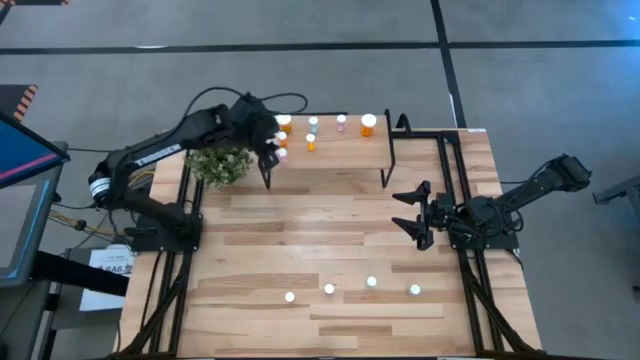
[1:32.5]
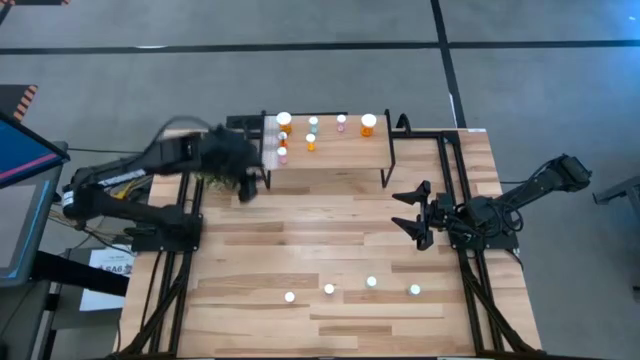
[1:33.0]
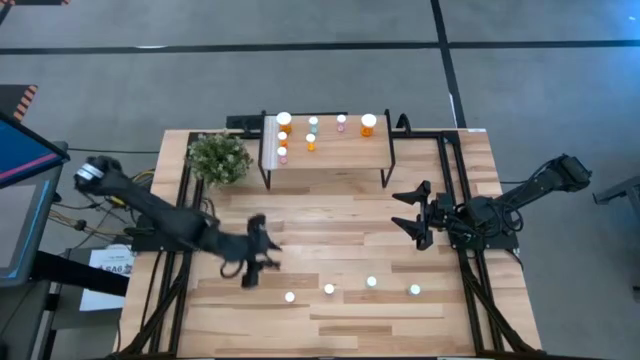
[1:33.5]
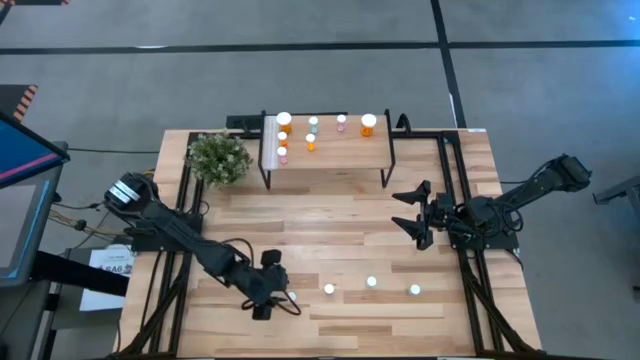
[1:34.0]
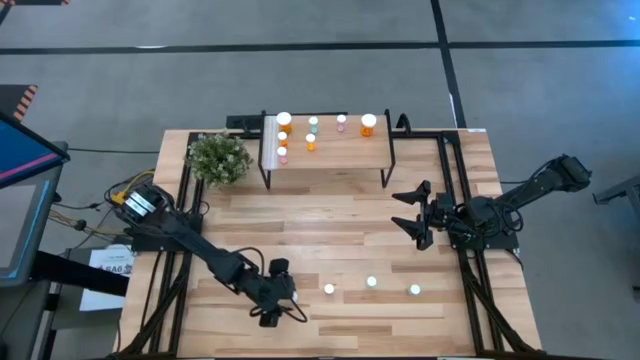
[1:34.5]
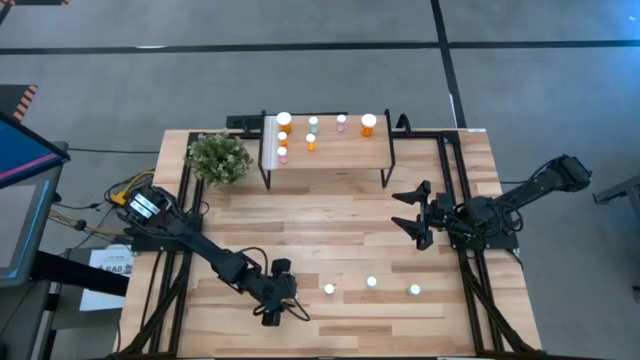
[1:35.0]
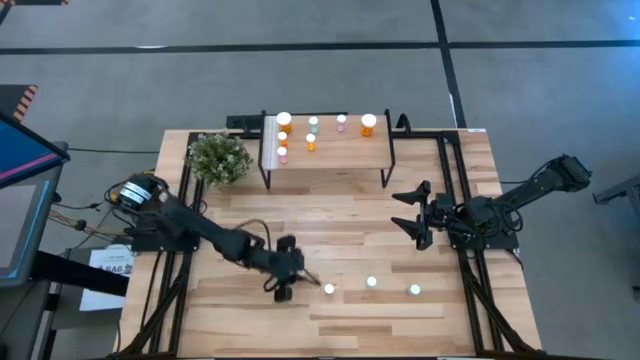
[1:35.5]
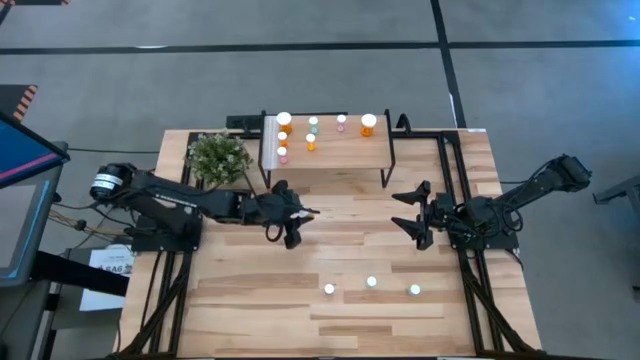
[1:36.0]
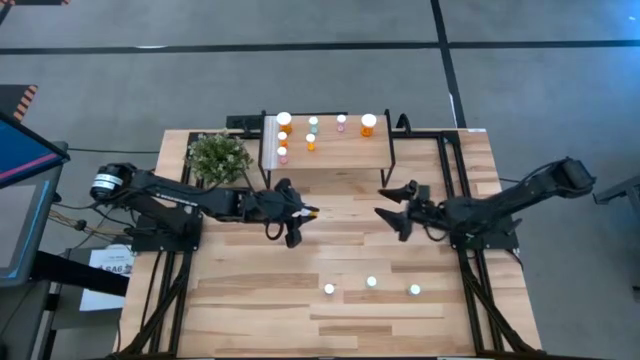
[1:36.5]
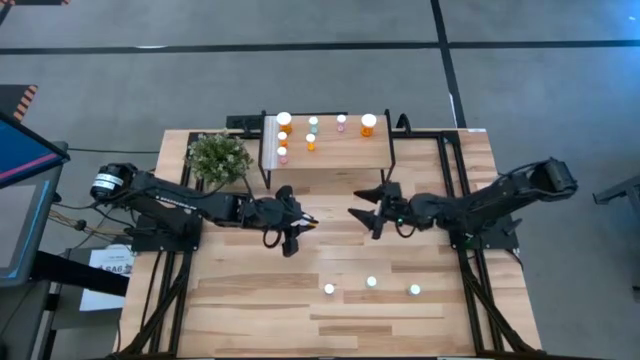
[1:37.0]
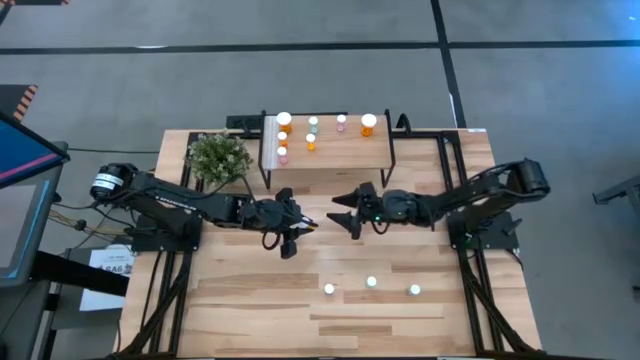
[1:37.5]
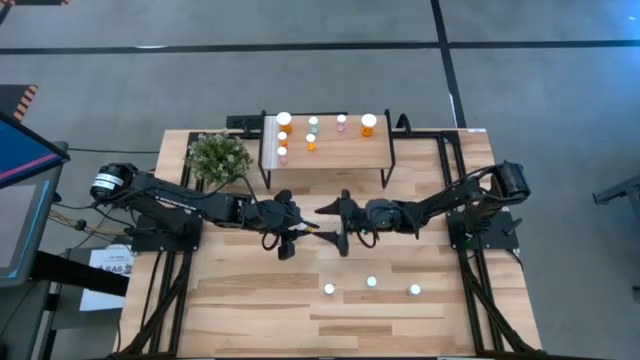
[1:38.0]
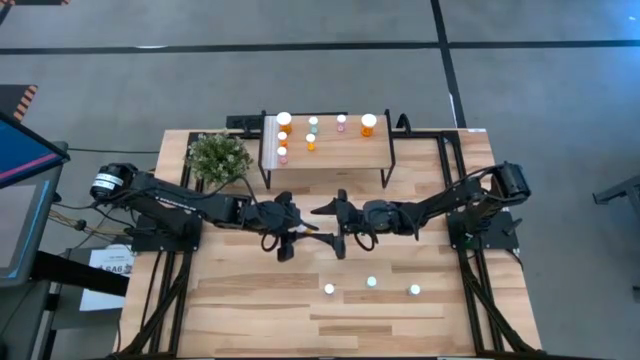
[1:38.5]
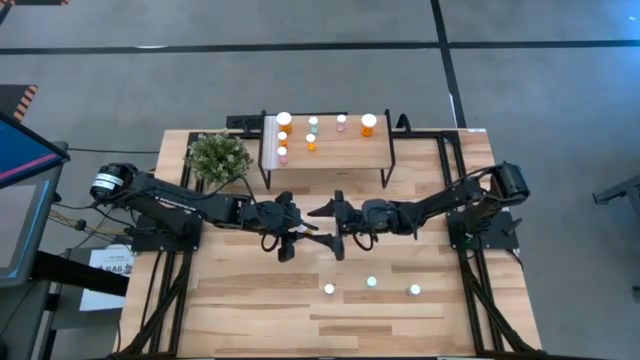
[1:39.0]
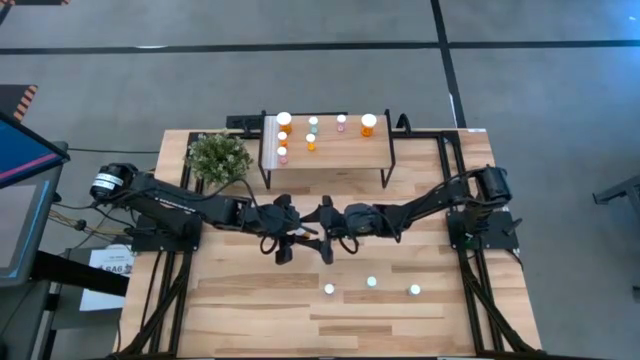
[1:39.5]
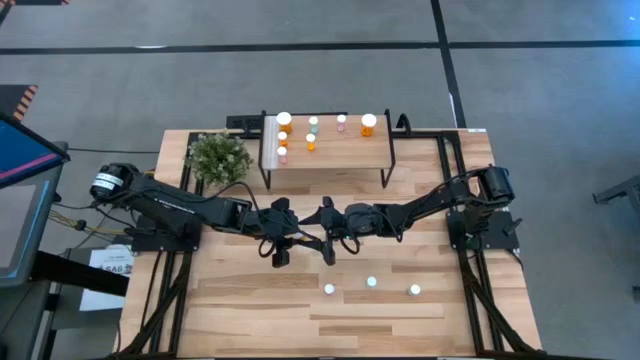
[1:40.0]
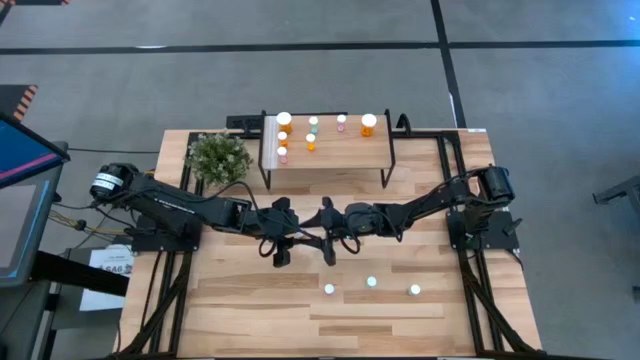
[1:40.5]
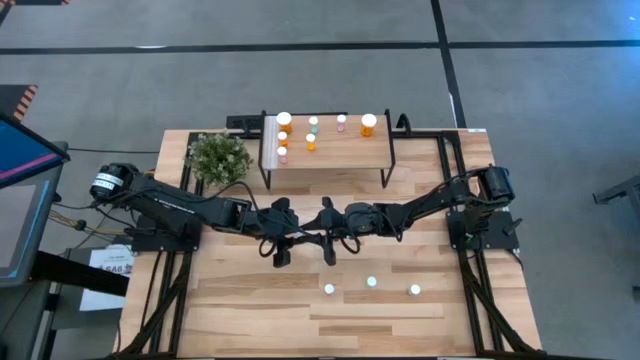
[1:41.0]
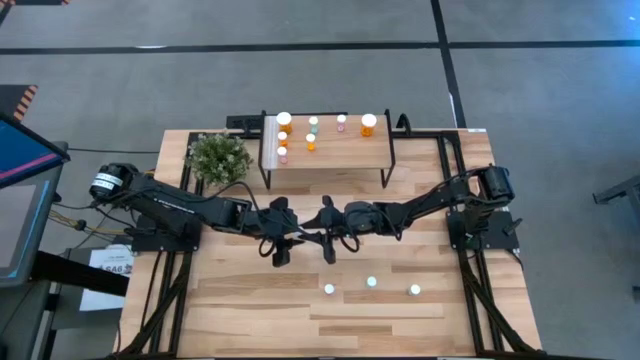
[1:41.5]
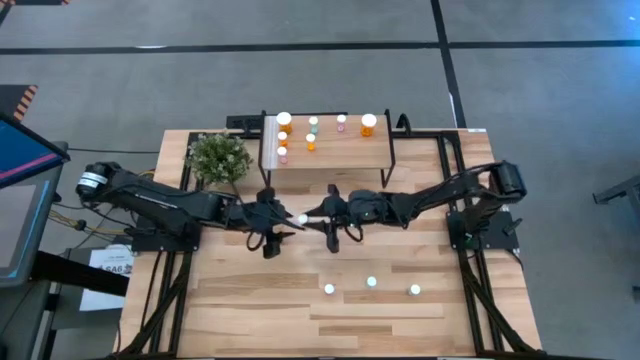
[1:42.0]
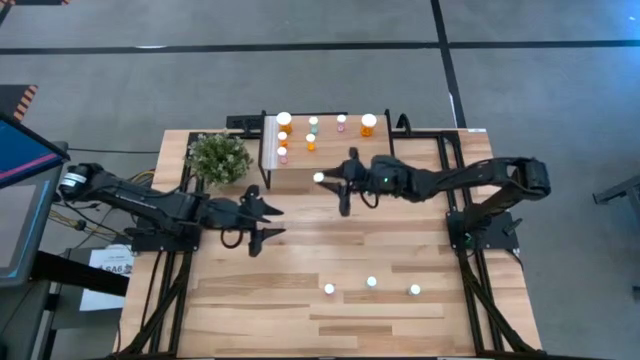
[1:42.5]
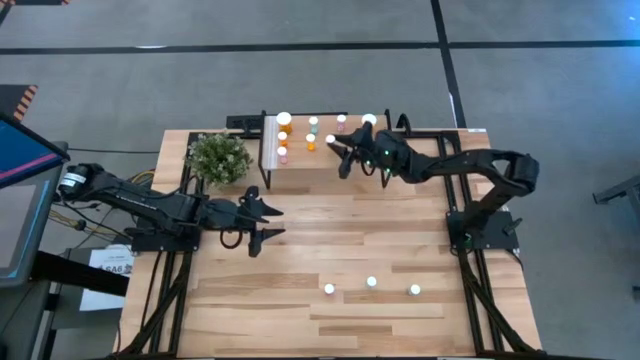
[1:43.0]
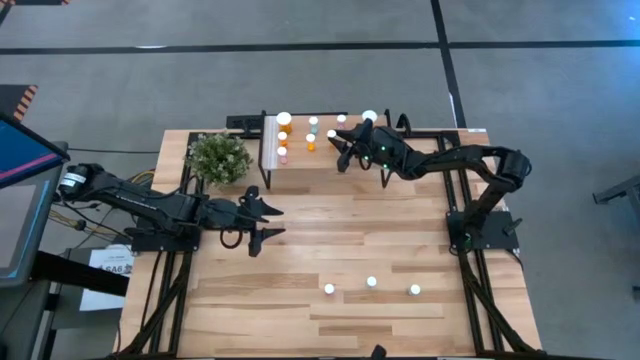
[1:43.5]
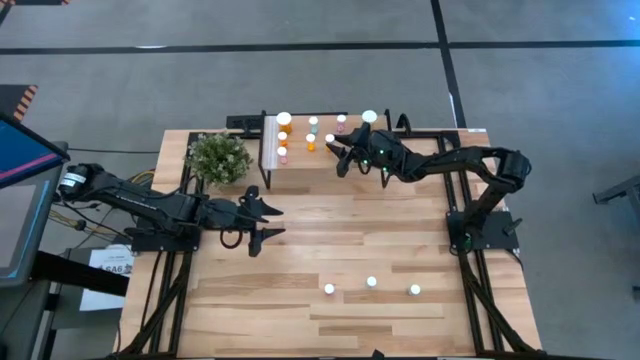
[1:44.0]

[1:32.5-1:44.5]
Task: Pick and place medicine bottles onto shelf by color
Put the small orange pill bottle on the shelf

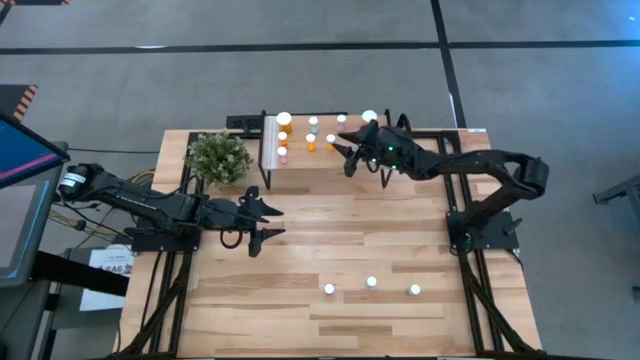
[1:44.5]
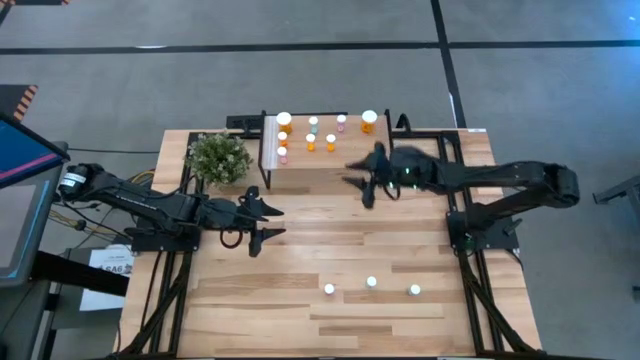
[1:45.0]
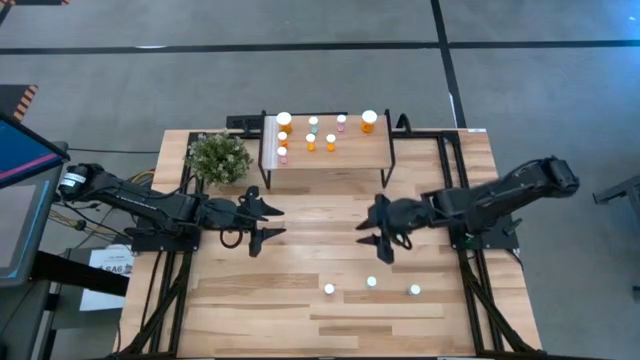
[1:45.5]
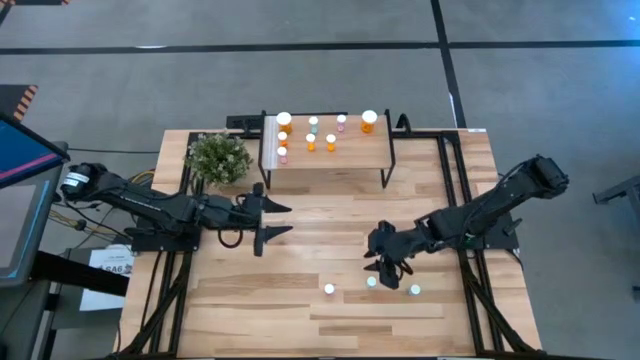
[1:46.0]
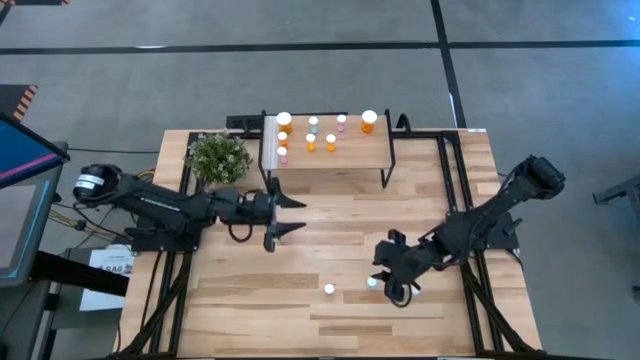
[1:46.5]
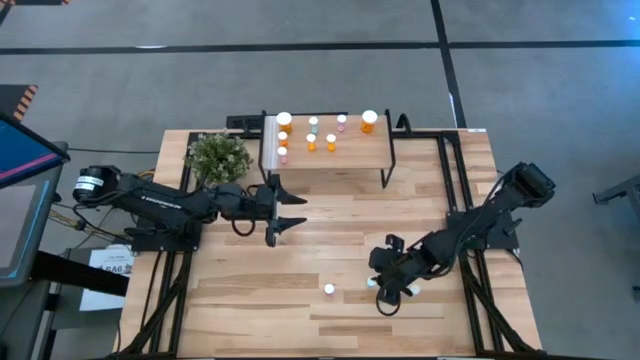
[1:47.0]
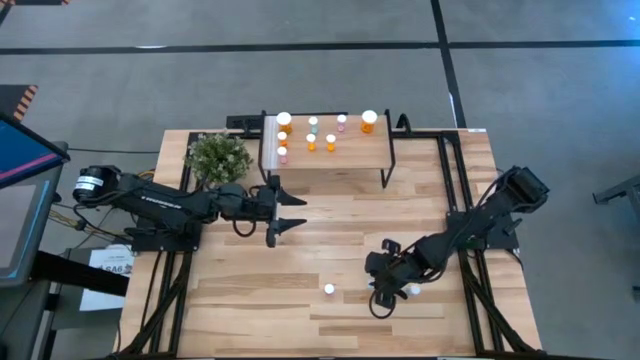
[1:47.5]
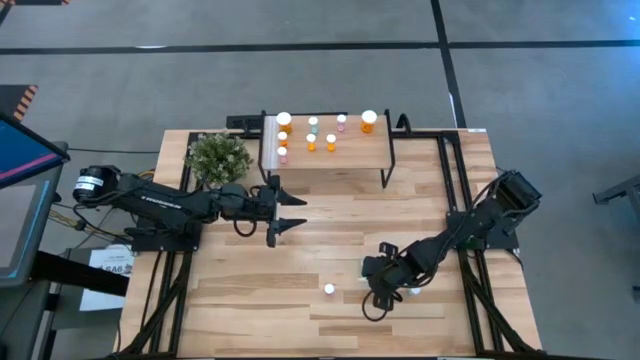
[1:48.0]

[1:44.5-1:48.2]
Put the small left blue pill bottle on the shelf

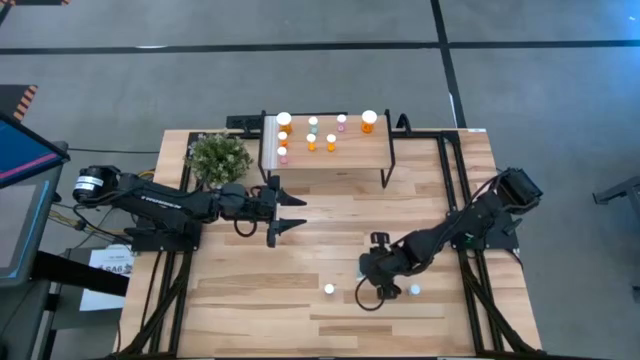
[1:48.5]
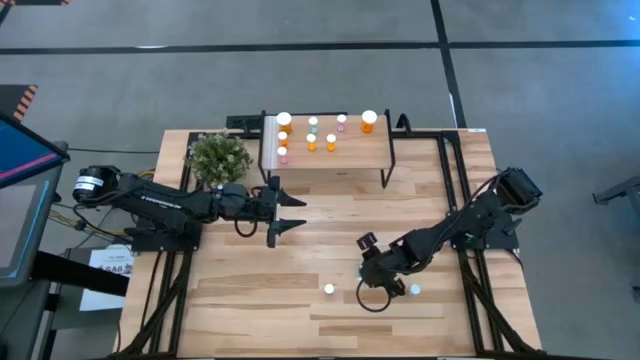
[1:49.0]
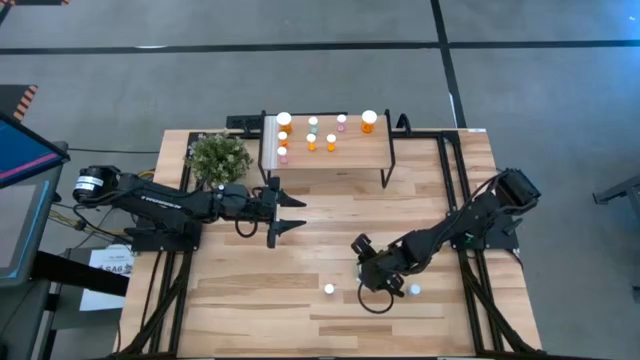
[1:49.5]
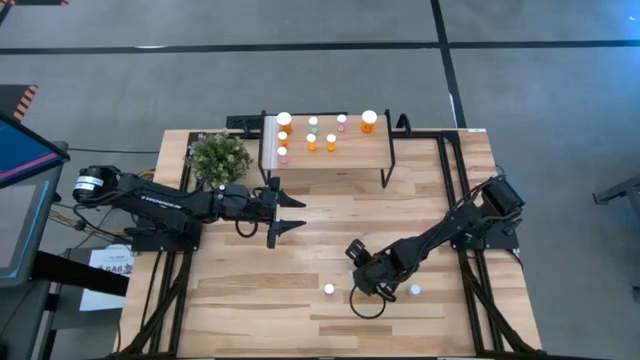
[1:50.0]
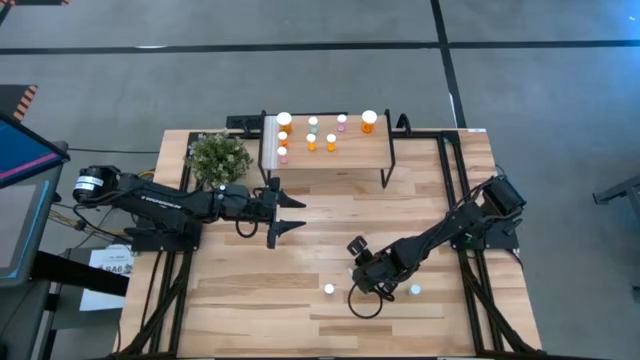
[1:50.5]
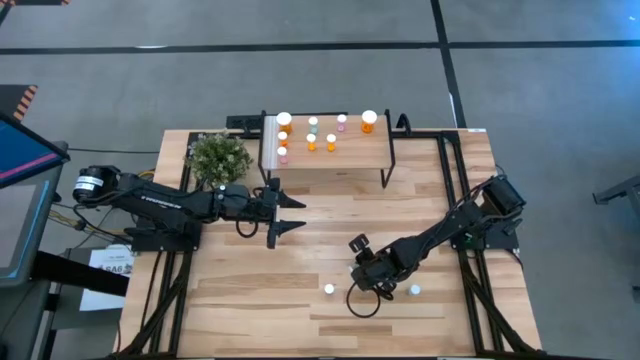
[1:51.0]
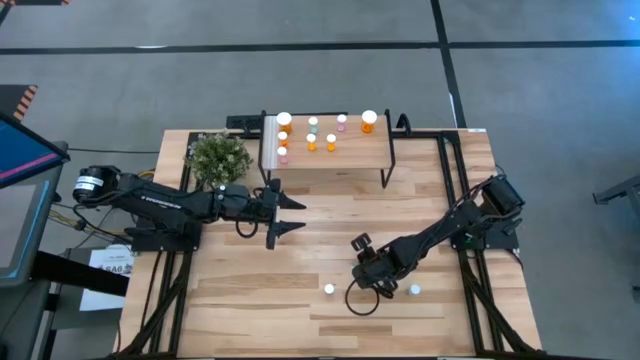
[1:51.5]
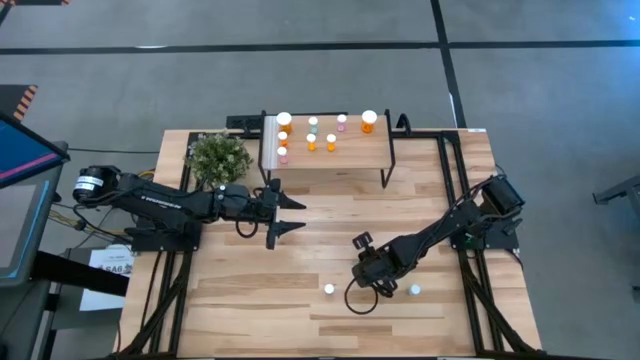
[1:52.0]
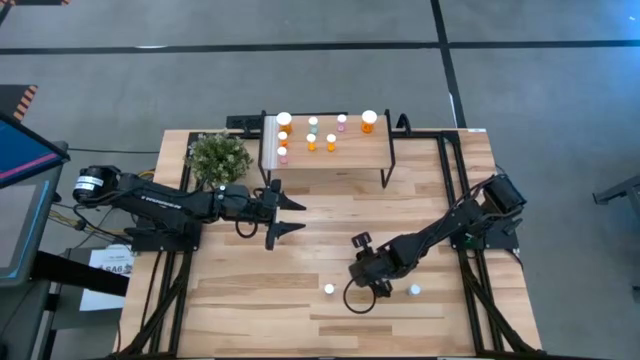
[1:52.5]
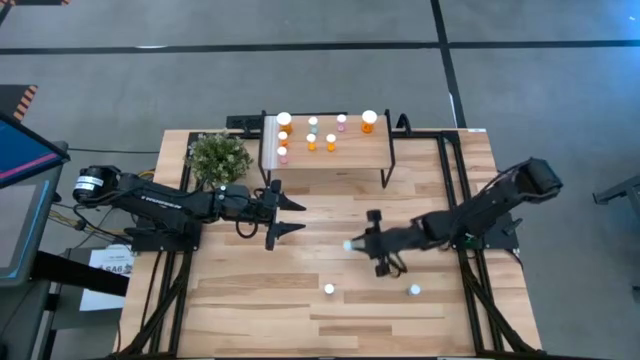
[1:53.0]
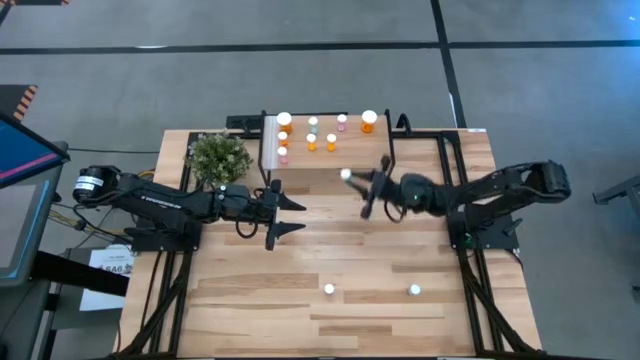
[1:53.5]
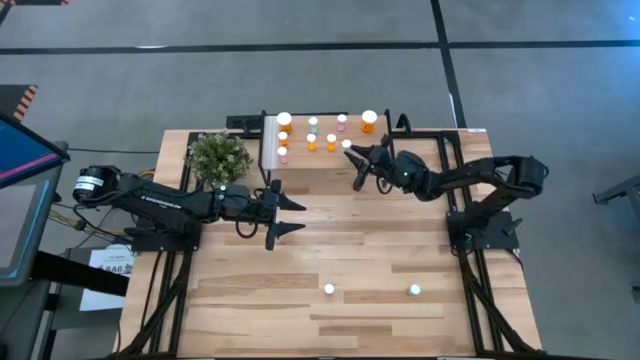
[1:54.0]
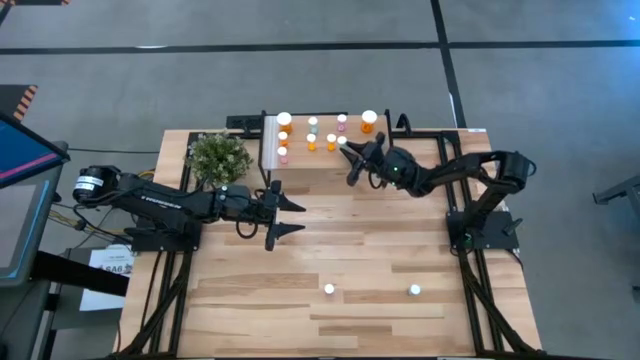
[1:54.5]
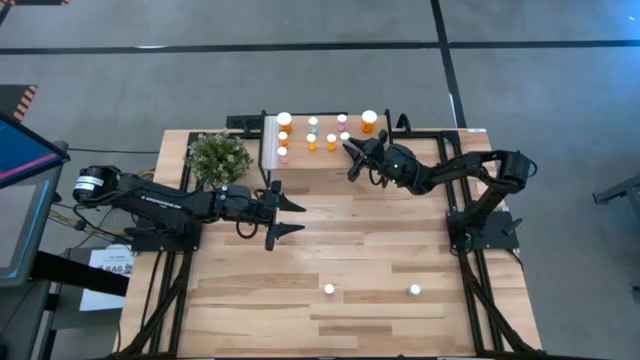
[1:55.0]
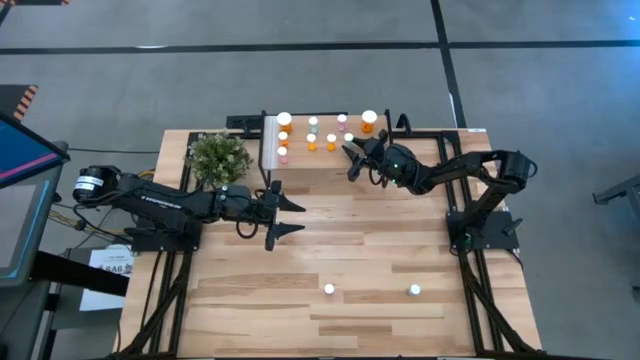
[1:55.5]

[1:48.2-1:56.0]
Put the small left blue pill bottle on the shelf
